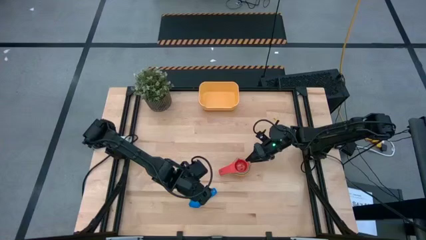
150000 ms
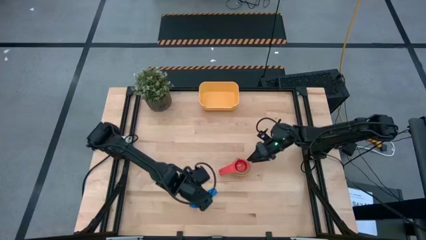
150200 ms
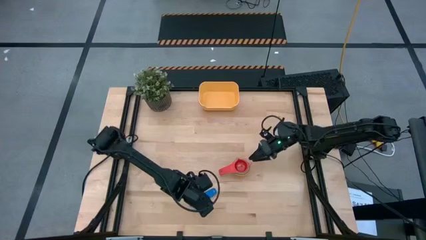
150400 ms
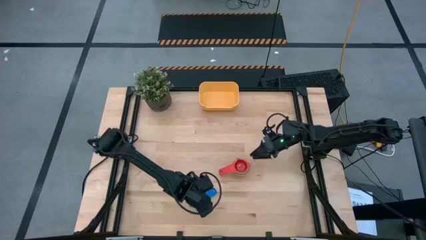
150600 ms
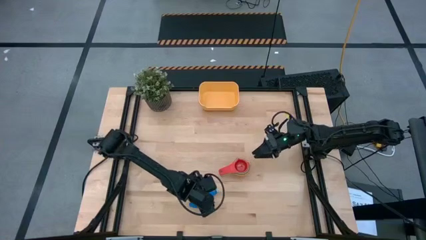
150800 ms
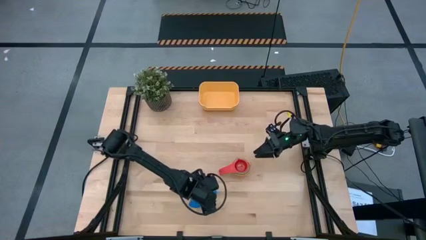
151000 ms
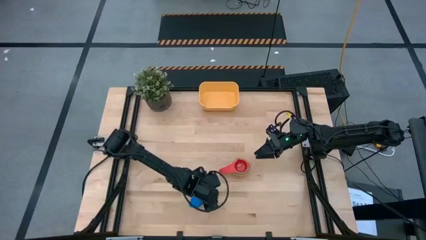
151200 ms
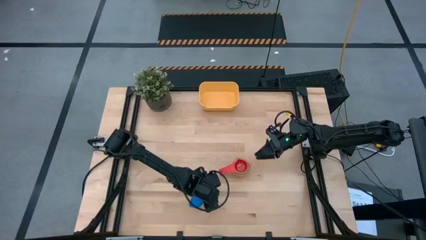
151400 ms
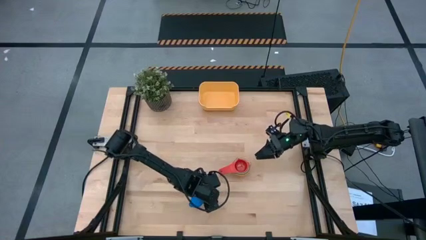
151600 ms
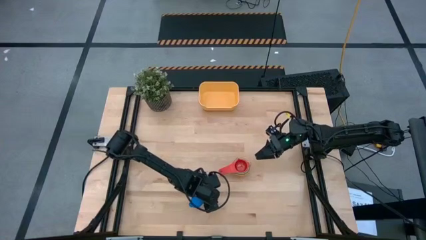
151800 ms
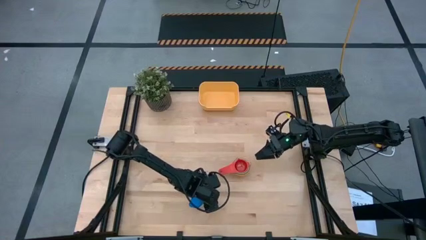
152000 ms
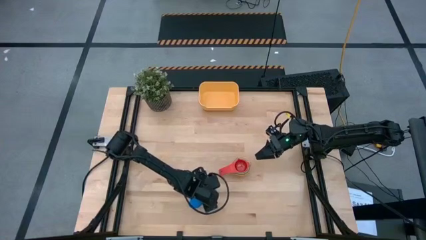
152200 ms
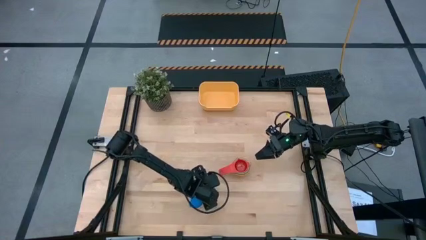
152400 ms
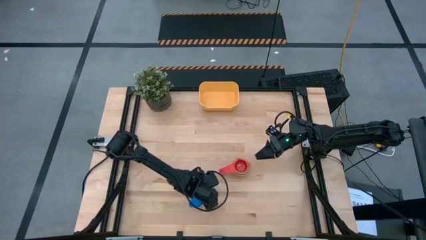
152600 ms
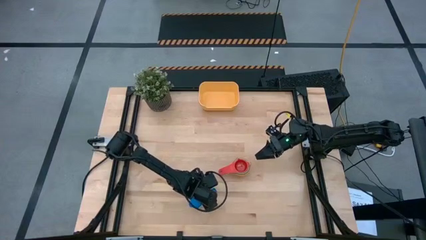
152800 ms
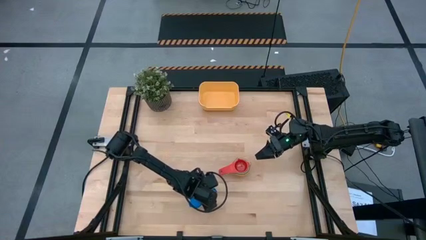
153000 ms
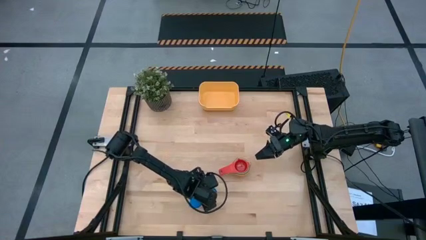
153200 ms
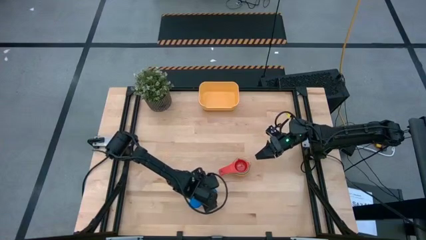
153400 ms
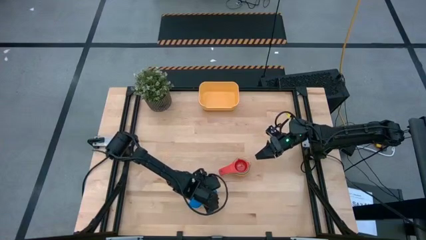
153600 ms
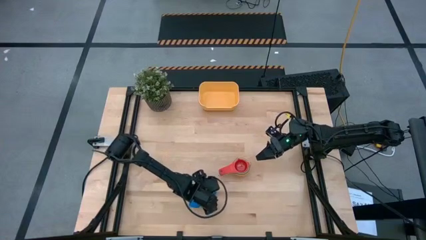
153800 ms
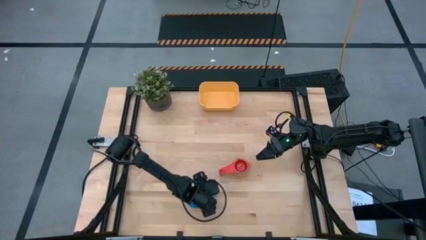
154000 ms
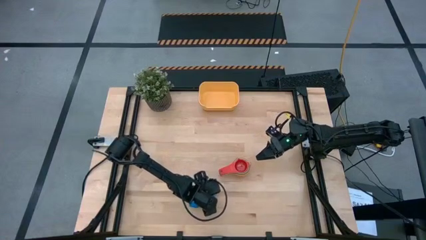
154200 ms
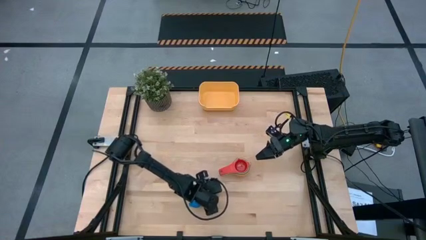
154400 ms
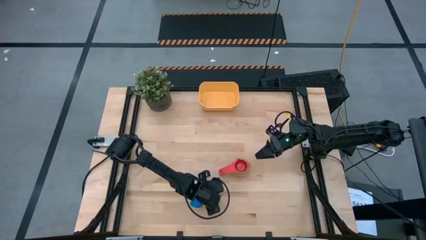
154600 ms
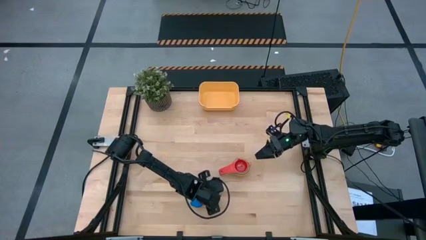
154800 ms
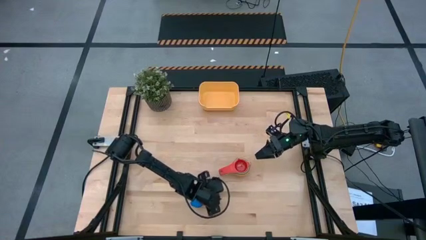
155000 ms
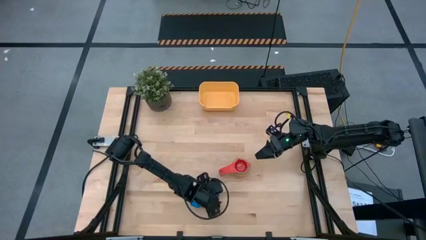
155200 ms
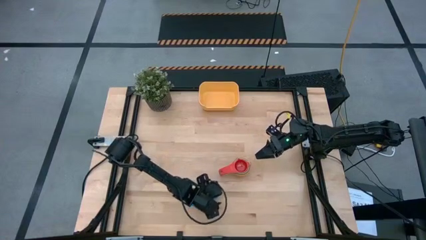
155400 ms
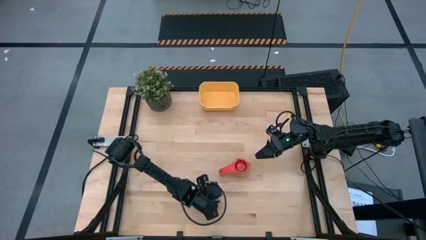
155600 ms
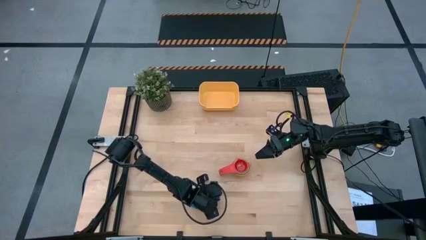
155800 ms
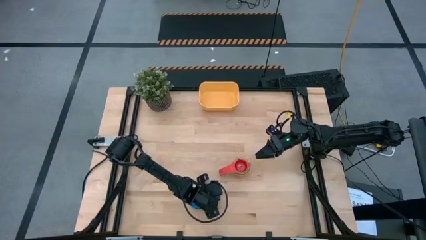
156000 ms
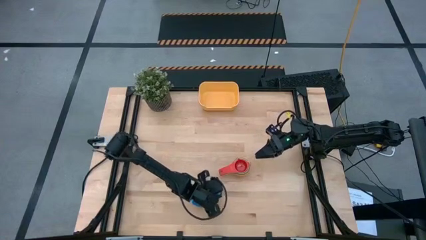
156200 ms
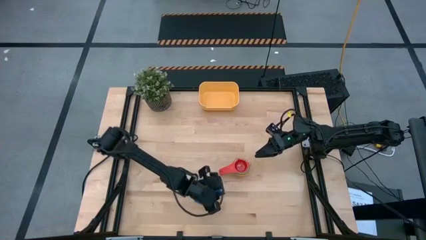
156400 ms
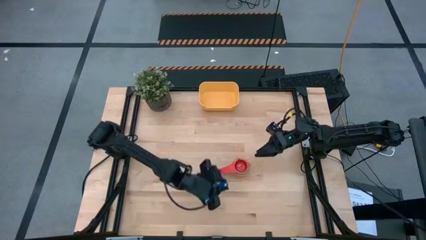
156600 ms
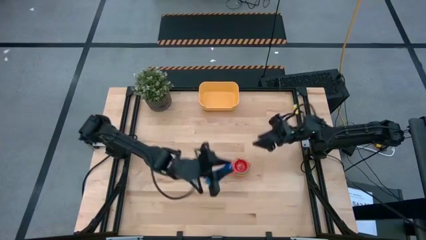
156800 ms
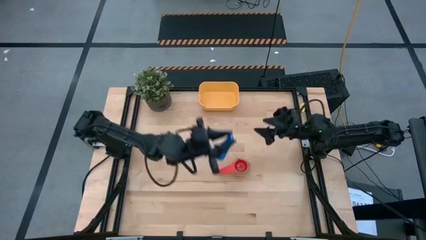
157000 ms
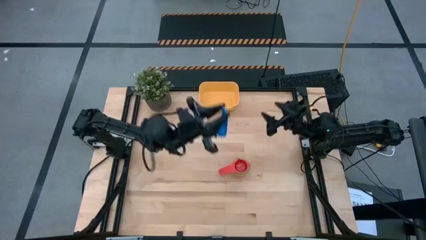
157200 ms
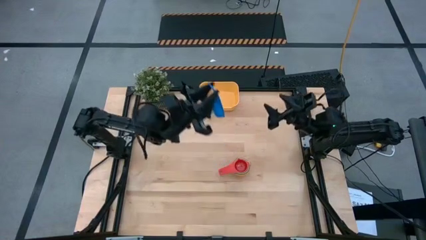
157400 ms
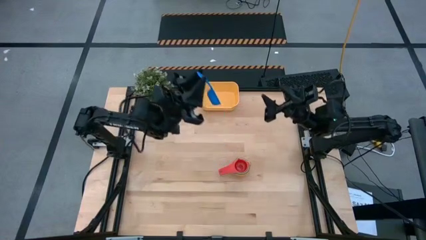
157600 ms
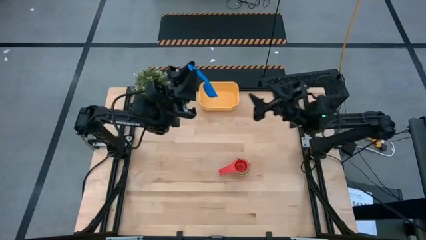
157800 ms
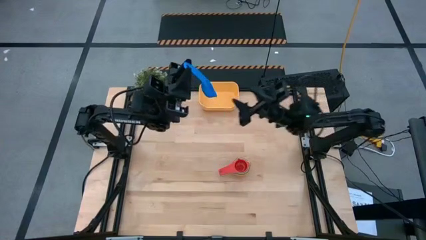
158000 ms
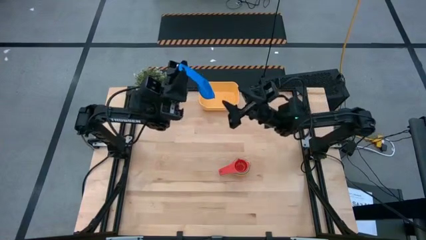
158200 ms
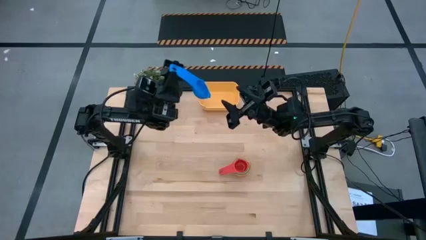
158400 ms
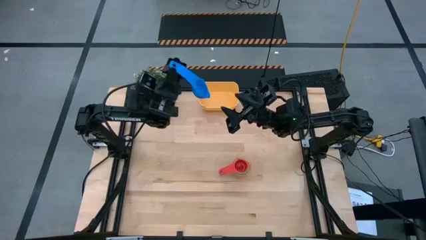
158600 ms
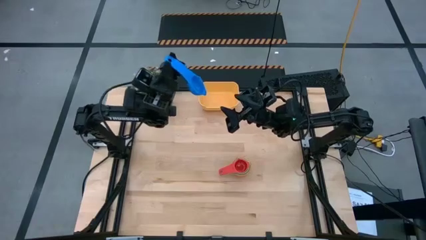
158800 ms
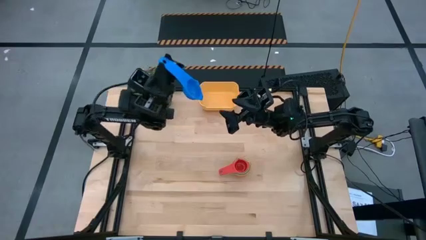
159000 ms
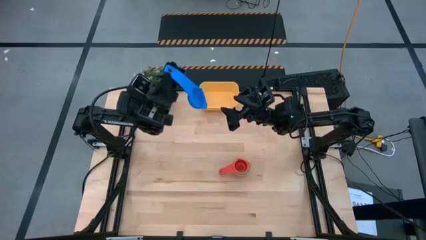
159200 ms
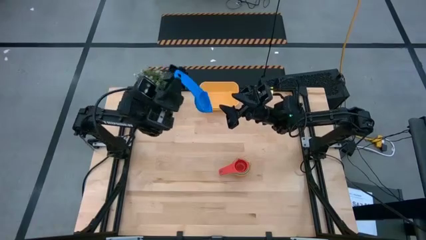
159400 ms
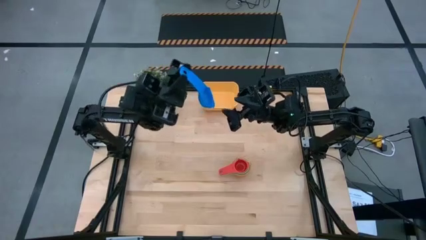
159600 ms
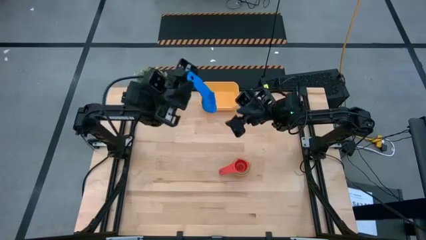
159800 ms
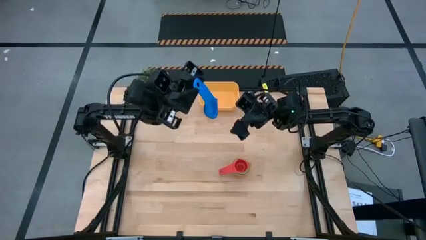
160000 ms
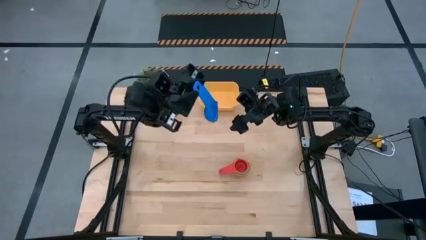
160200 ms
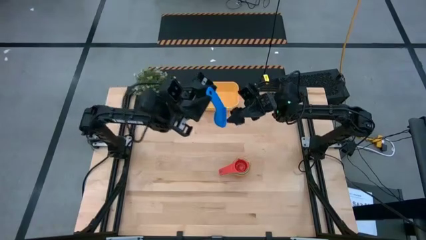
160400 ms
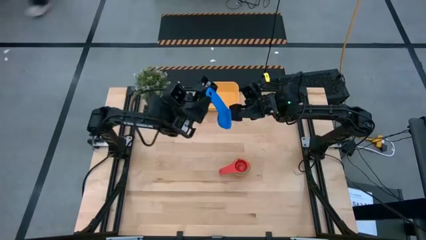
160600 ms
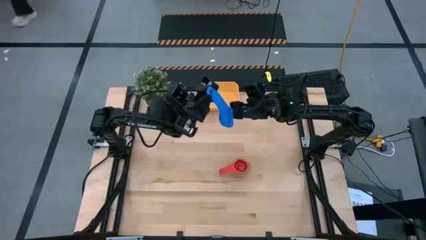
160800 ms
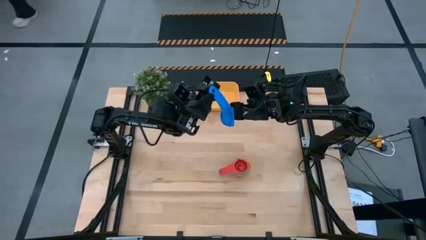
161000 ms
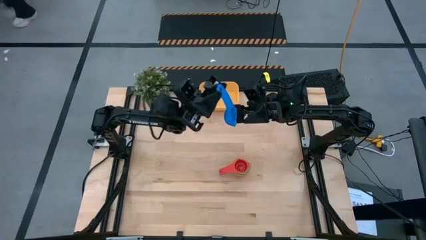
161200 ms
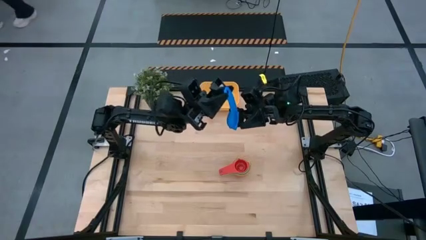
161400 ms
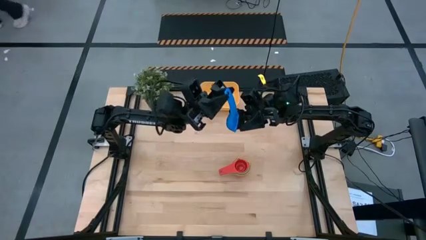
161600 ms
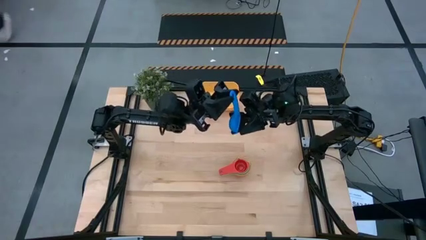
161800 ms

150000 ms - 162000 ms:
Task: Nest measuring cups in basket
Stack the blue measuring cup on top of the red measuring cup

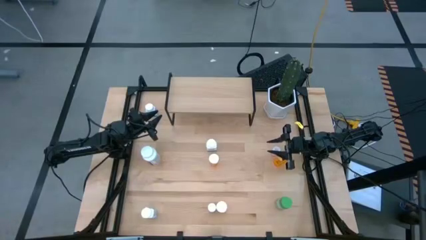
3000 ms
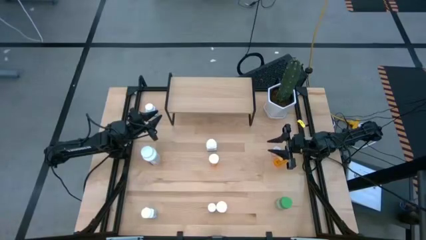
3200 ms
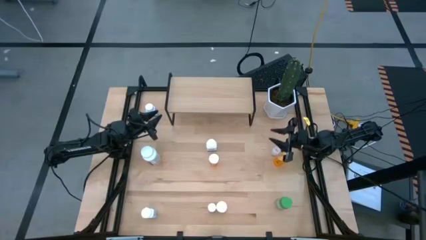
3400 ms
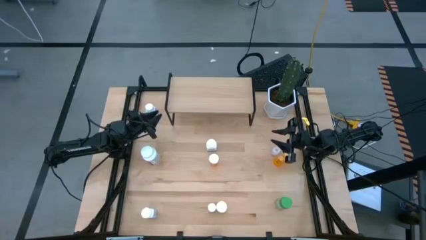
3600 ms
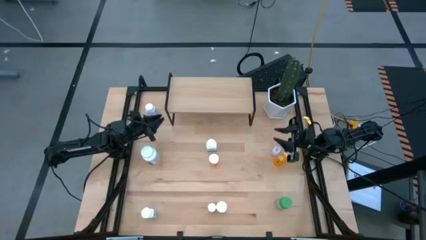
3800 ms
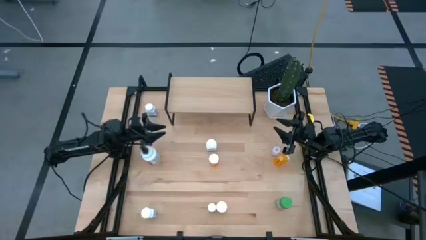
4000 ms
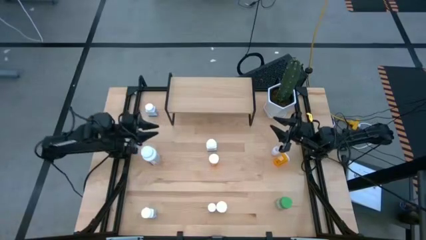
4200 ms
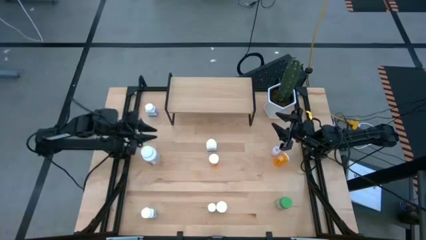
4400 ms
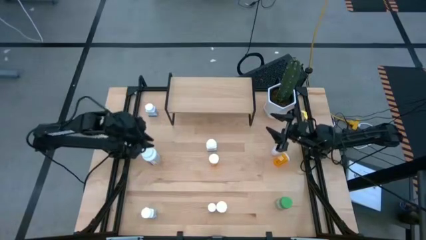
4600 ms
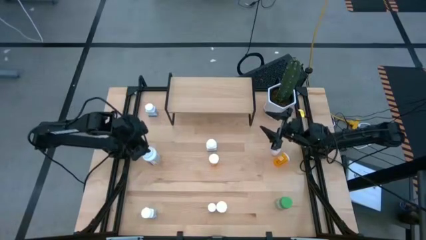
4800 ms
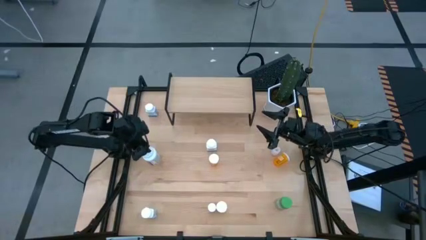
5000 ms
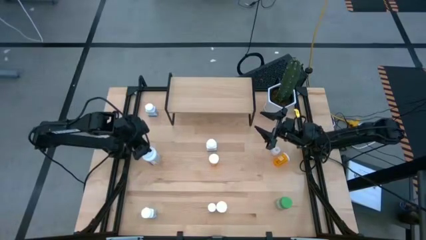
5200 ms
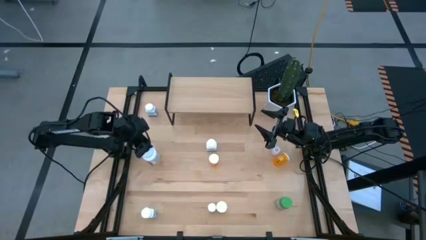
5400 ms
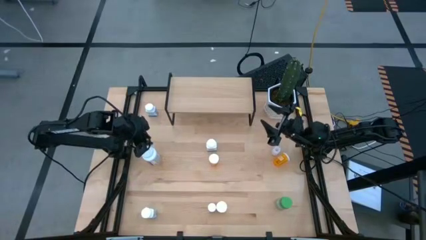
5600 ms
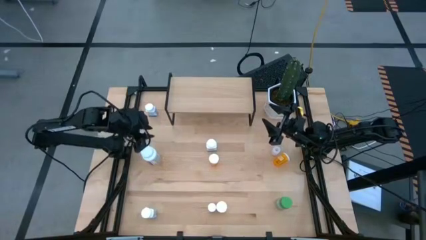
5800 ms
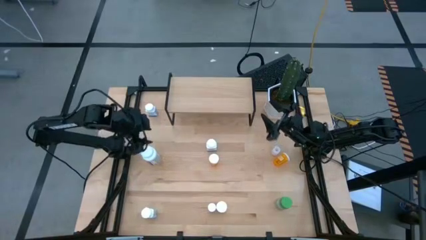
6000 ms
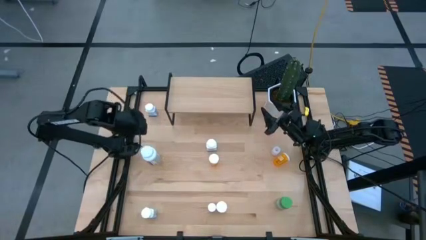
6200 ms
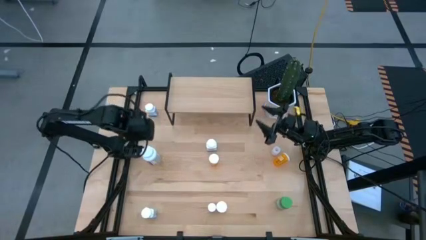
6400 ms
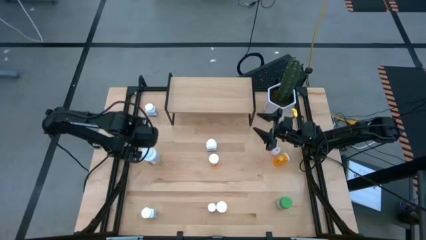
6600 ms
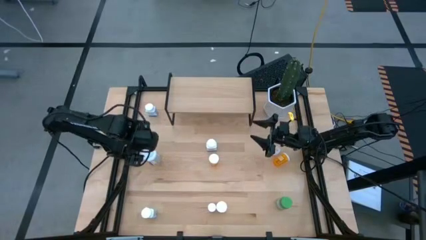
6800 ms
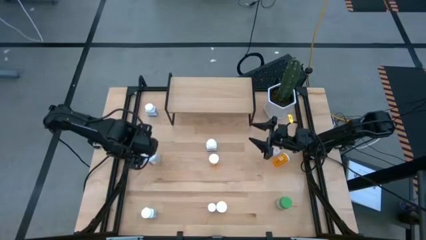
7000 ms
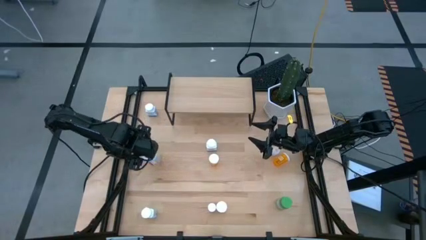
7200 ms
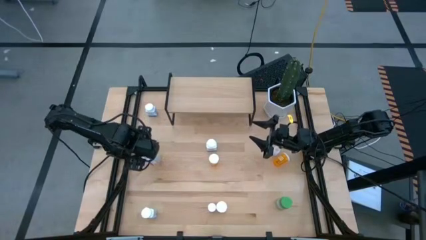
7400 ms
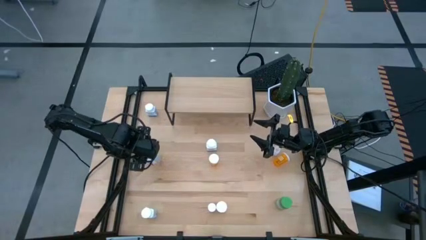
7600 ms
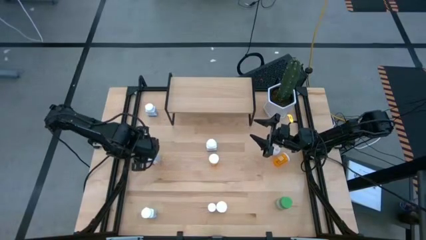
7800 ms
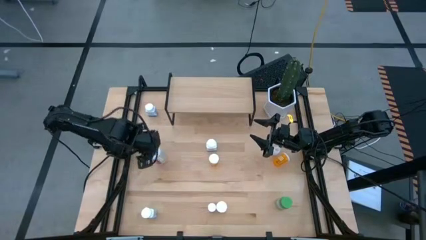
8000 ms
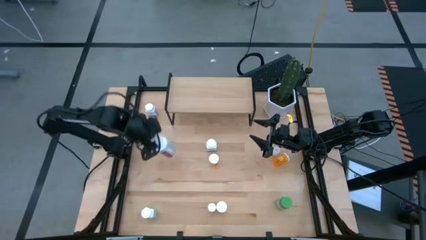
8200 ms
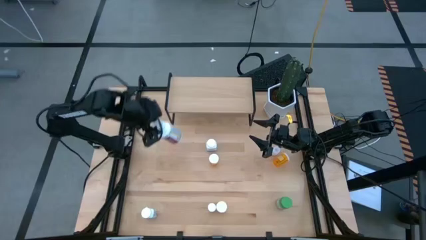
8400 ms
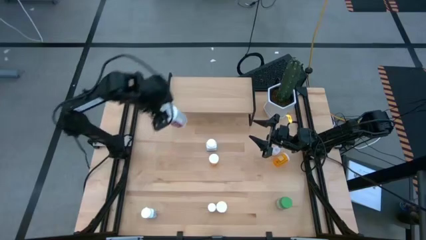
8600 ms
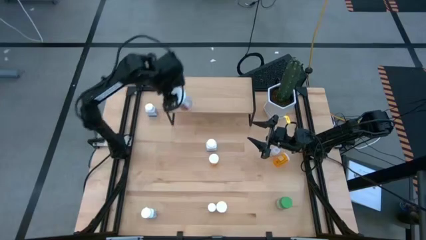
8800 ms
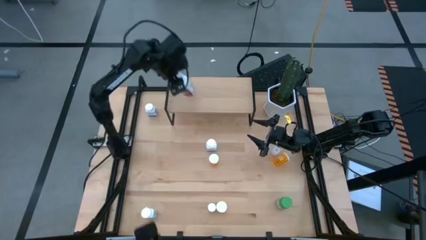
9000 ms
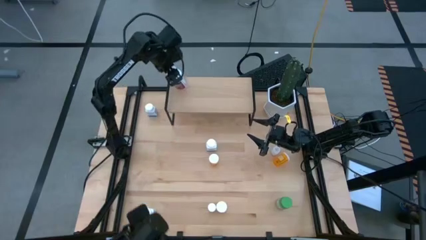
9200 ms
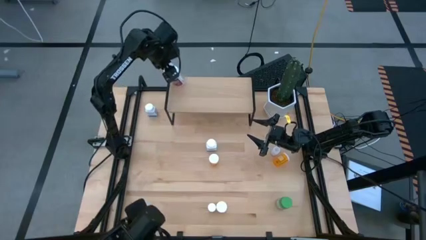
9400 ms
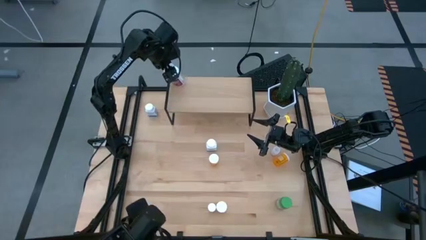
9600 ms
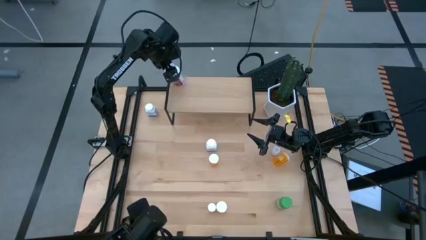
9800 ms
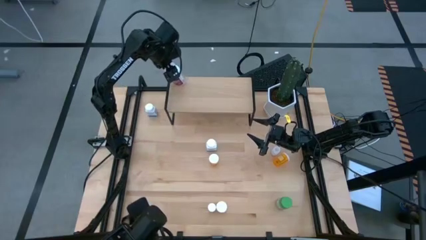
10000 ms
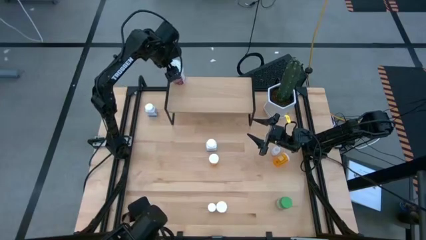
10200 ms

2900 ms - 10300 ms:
Task: Pick and place medicine bottles onto shelf by color
Put the white violet pill bottle on the shelf
